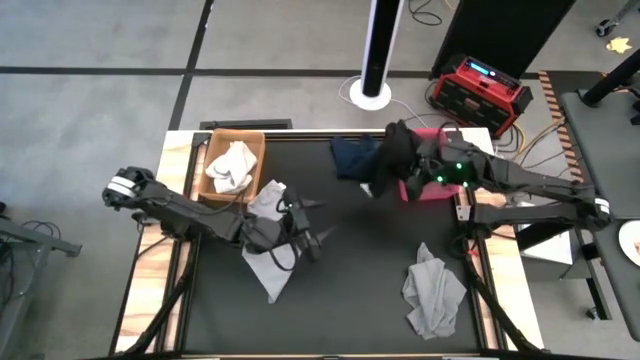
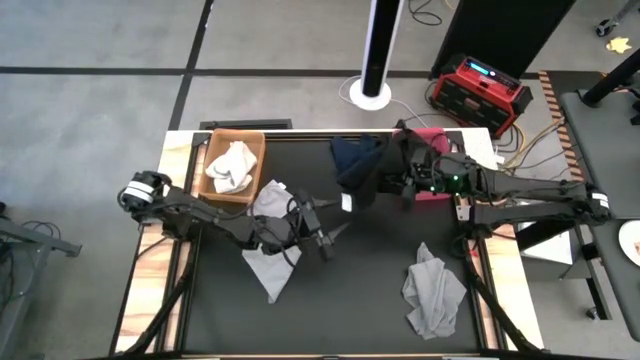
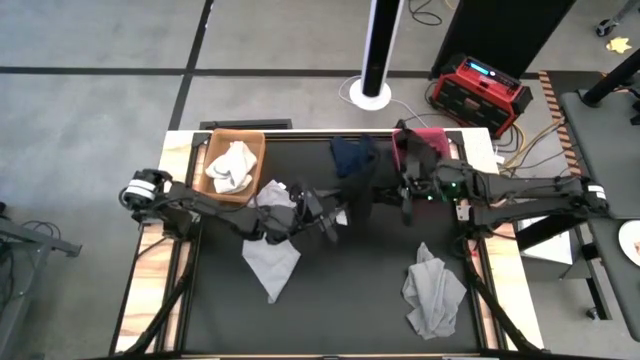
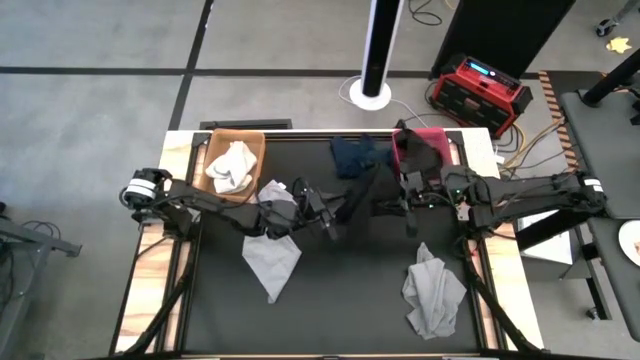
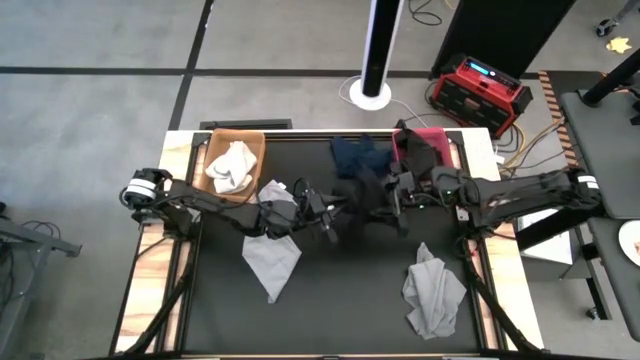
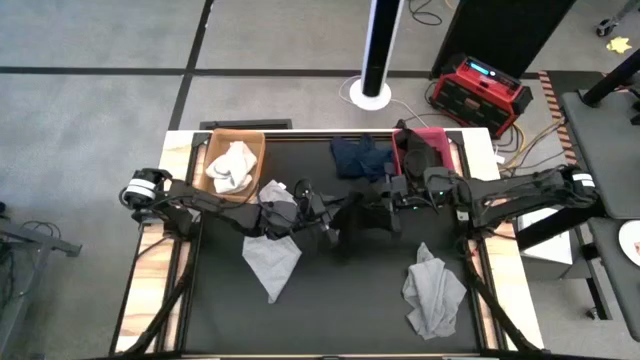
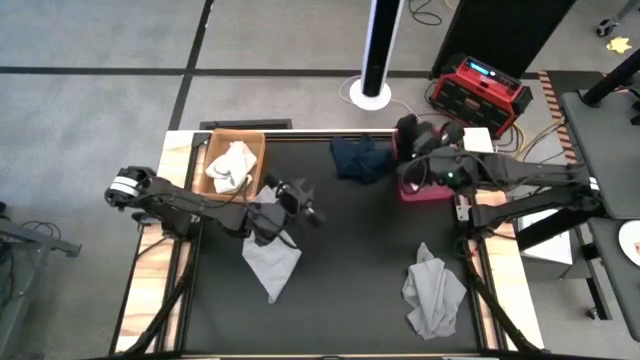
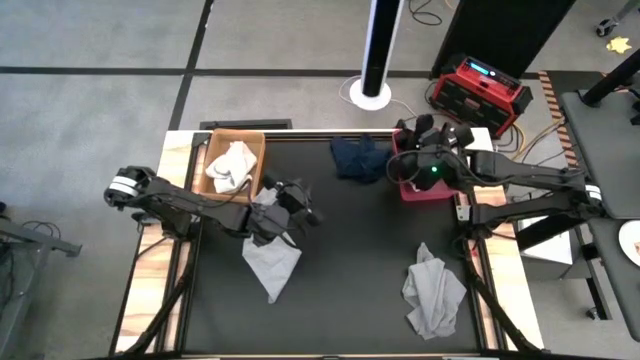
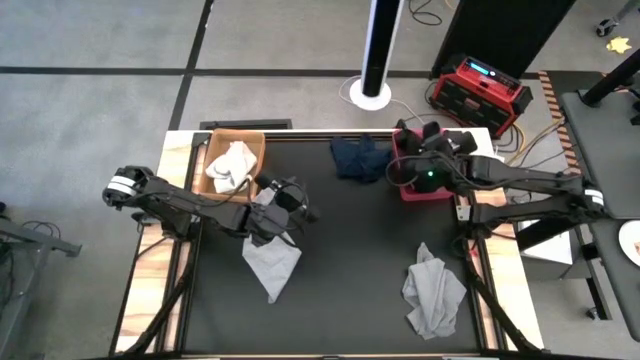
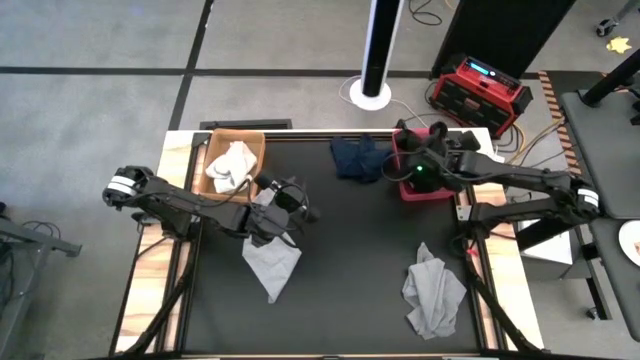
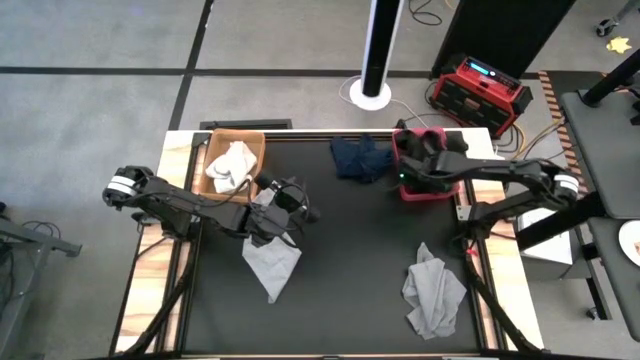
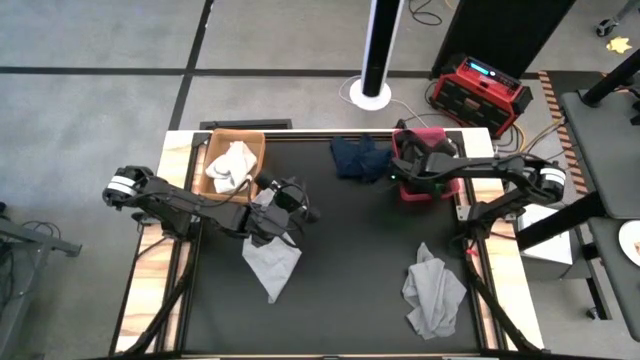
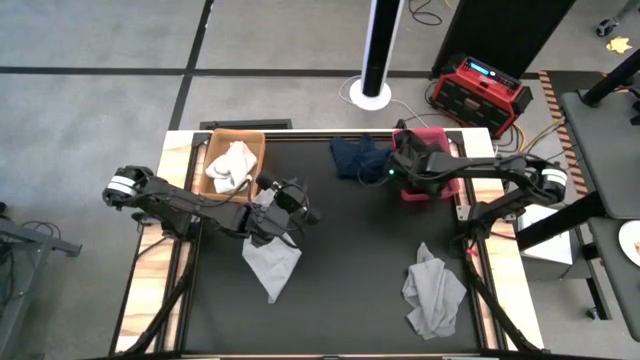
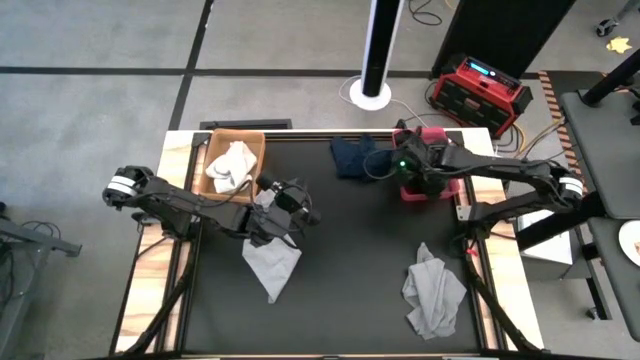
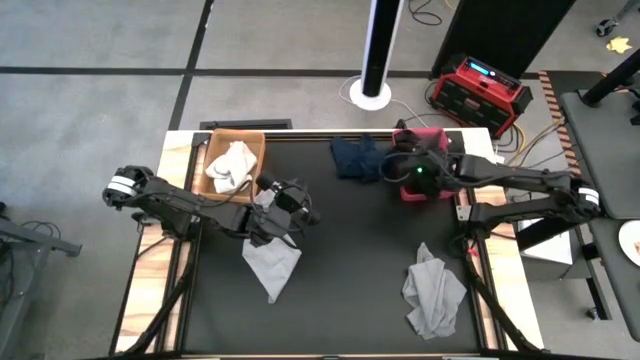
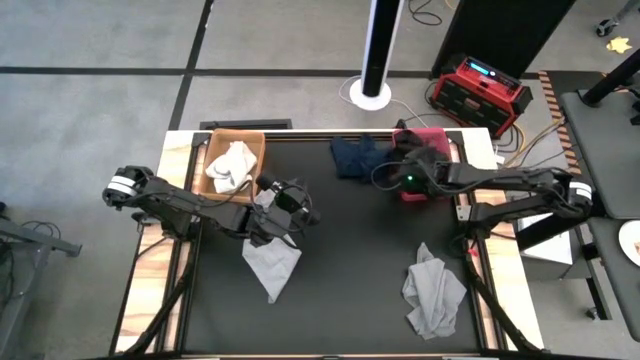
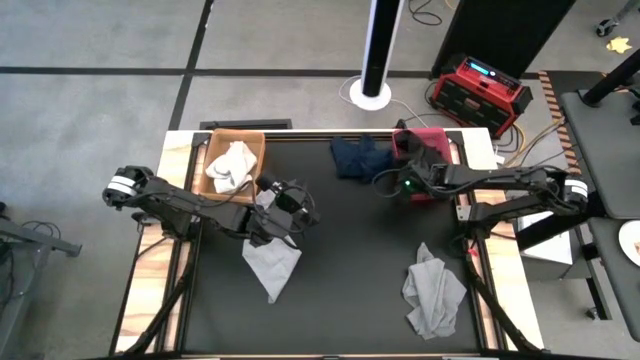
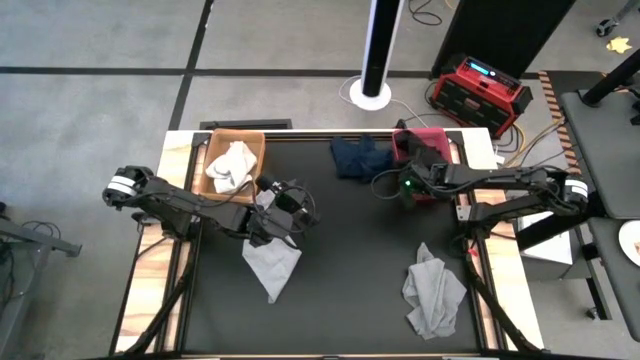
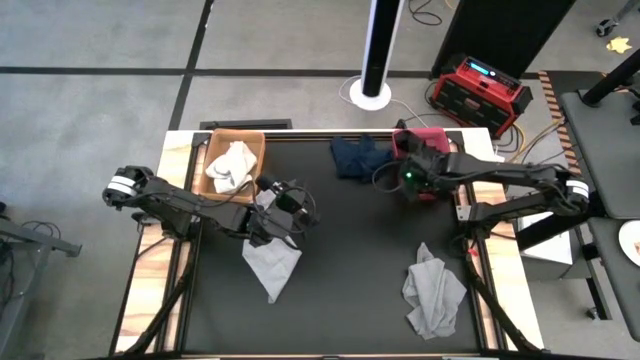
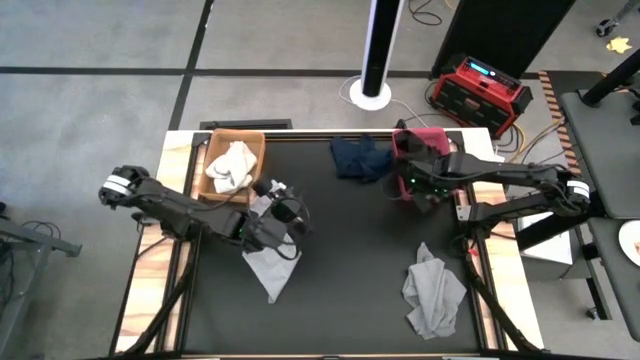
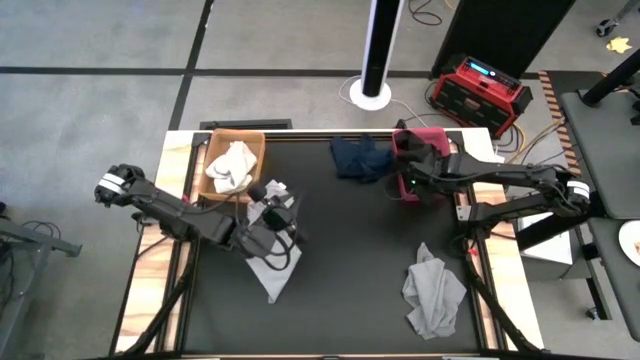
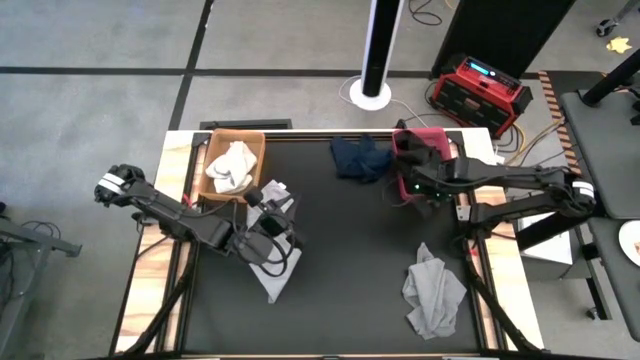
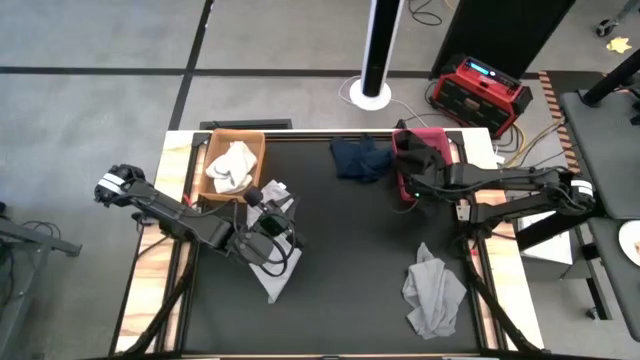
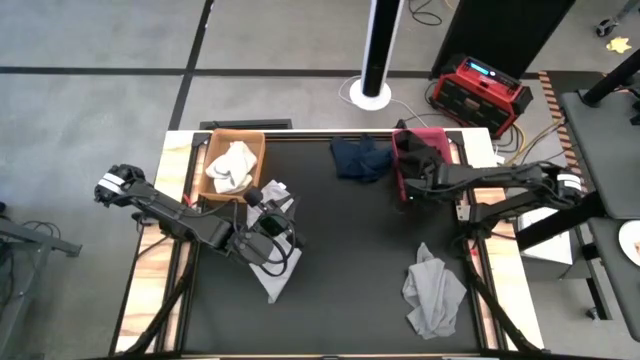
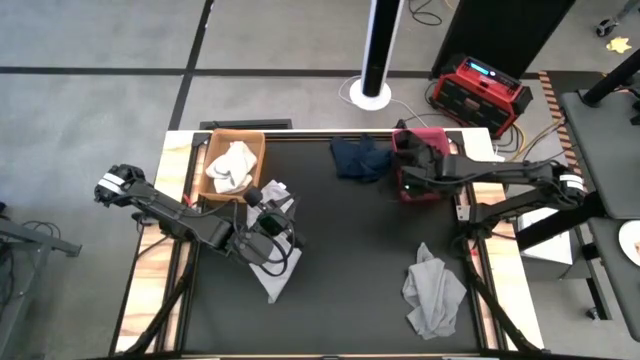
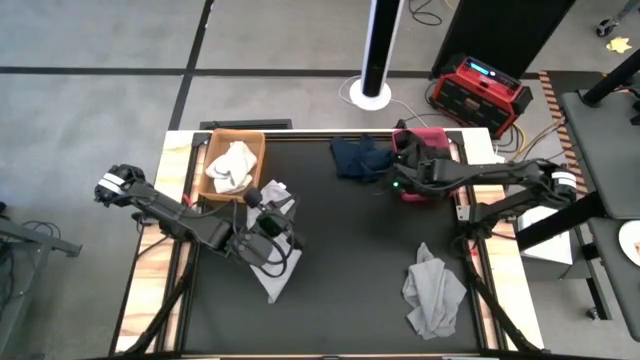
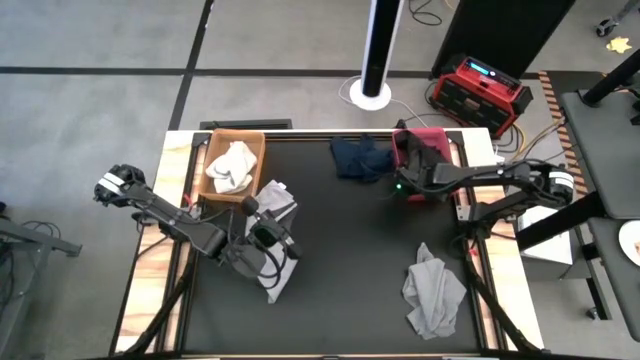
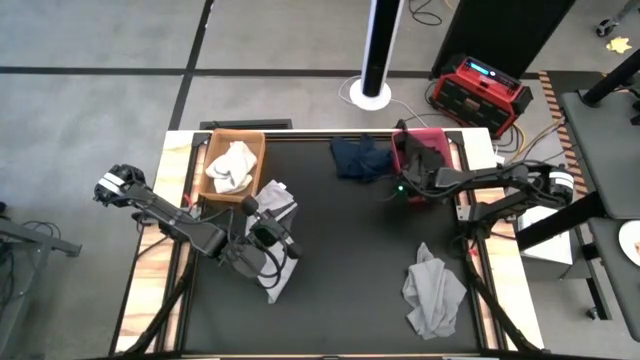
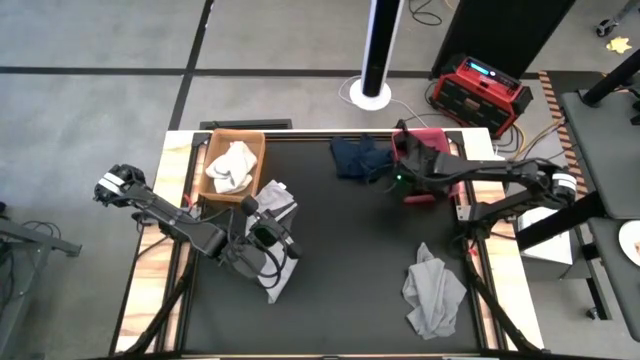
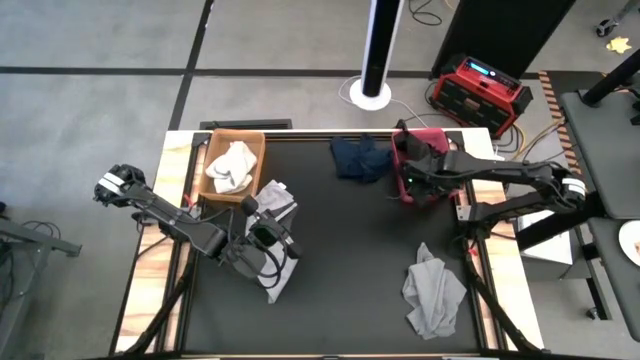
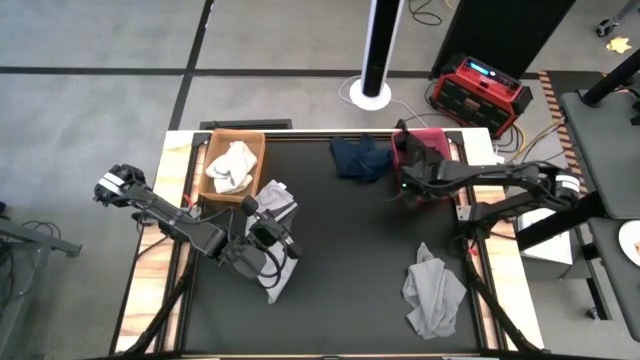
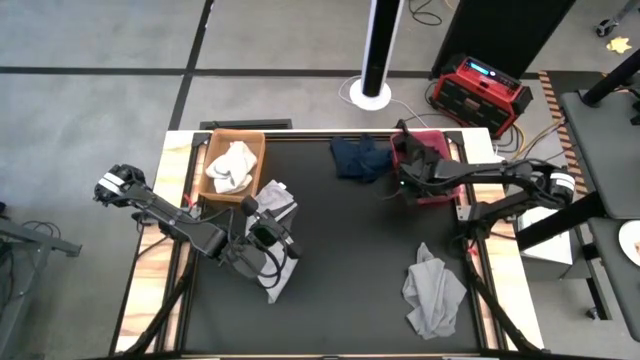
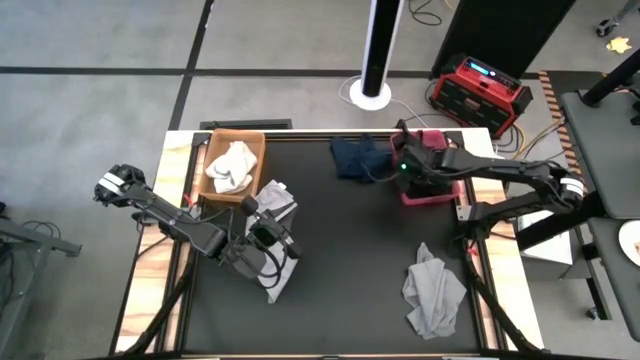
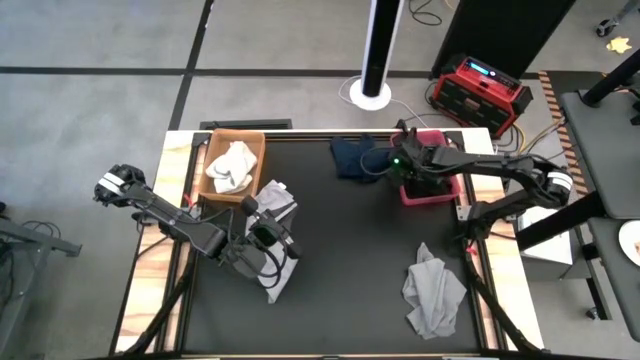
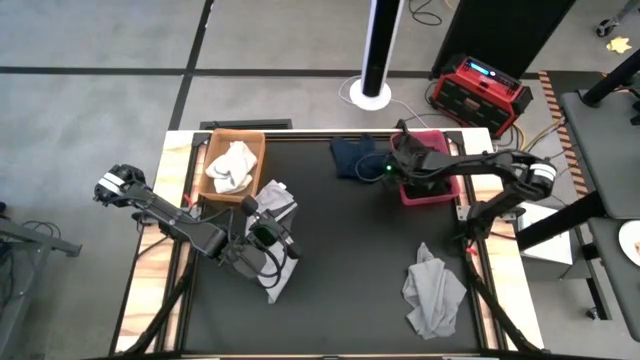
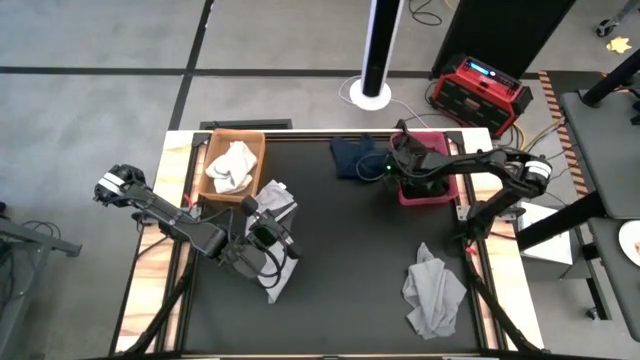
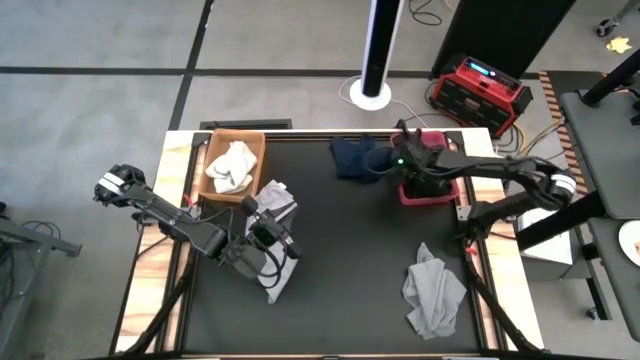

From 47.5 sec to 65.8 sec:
Task: Sort towels by color in basket
Put the black towel into the red bin

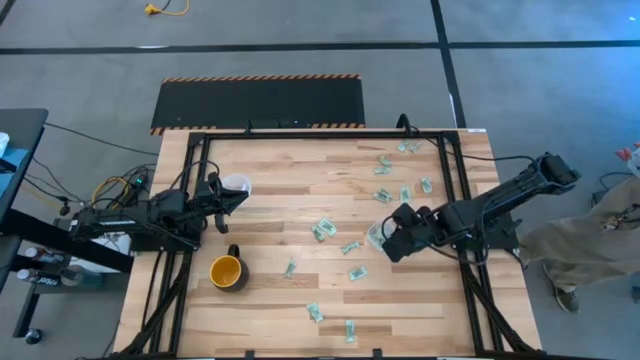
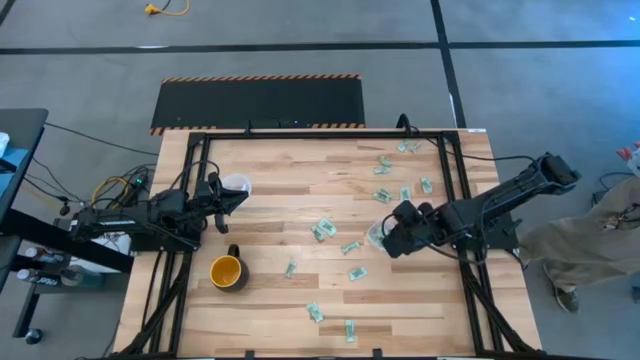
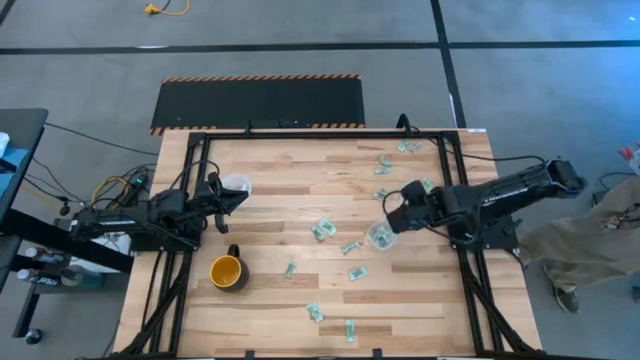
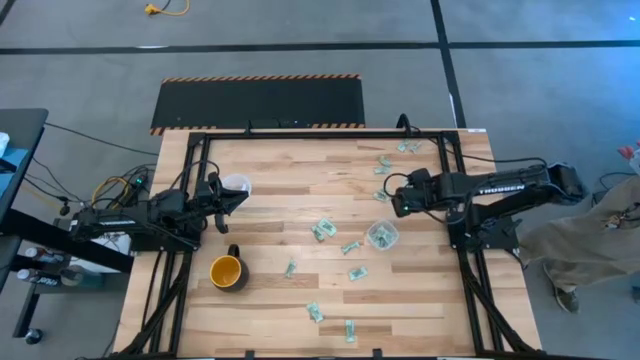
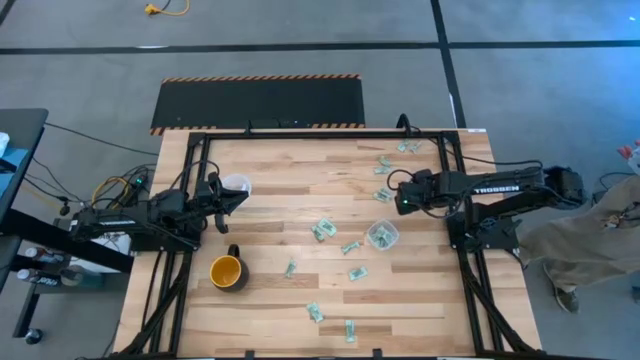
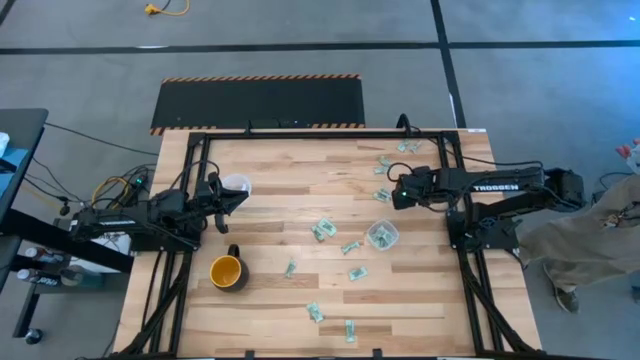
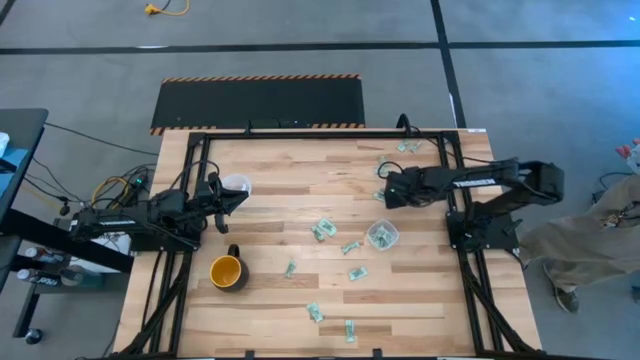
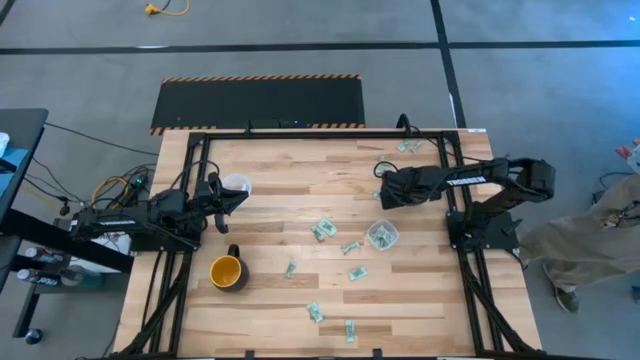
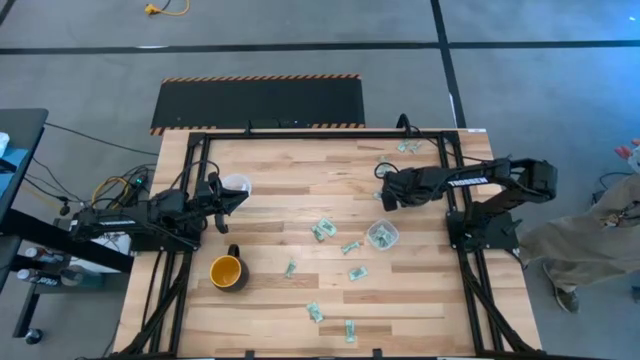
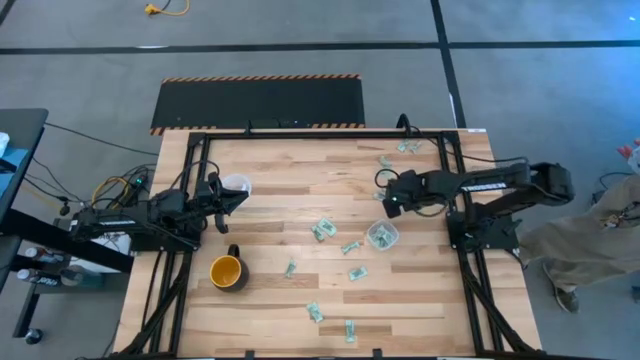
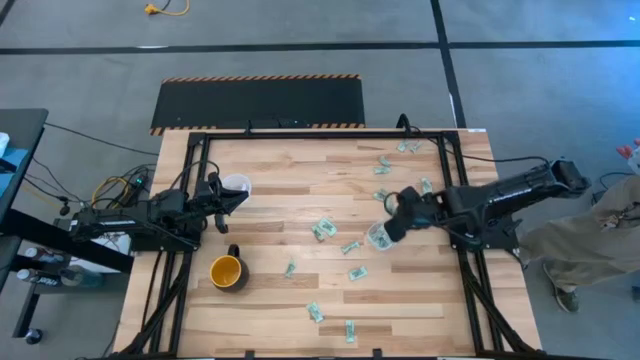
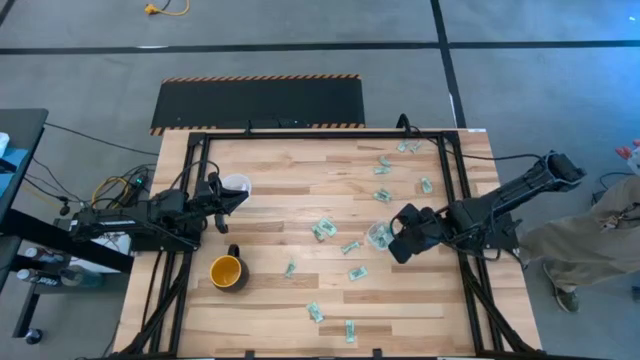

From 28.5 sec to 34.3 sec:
Task: Pick and place Stevia / Truvia into bins
Put the white stevia packet into the square transparent container
